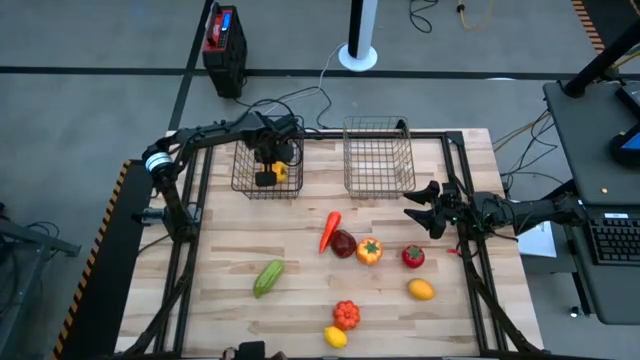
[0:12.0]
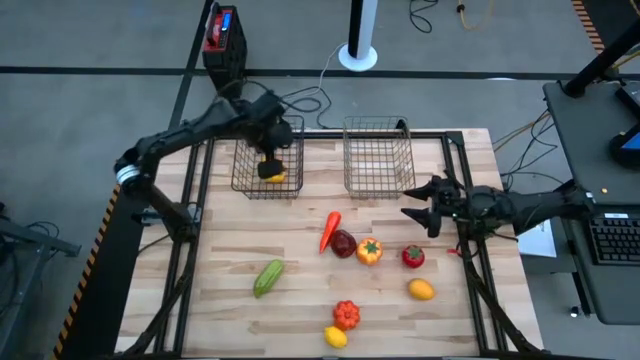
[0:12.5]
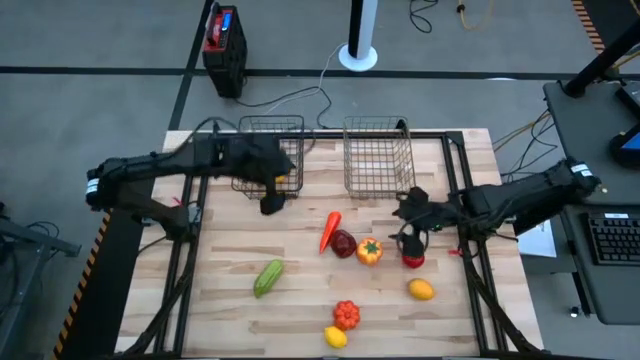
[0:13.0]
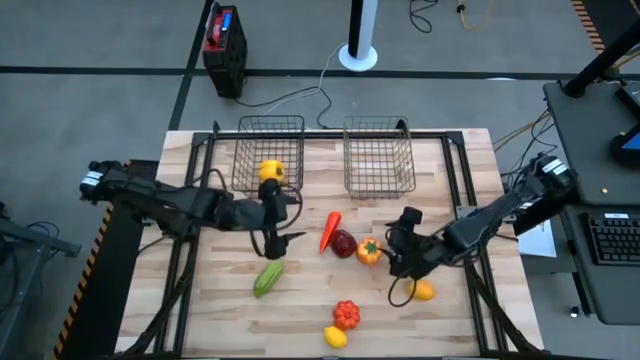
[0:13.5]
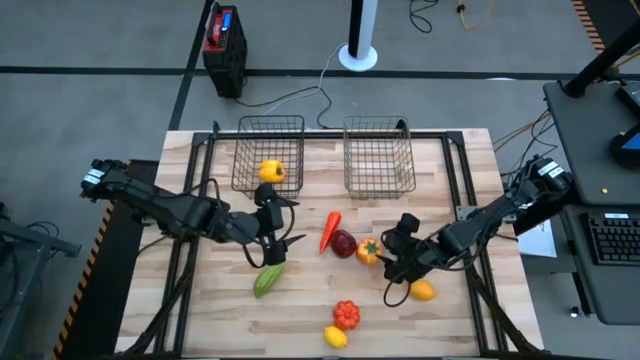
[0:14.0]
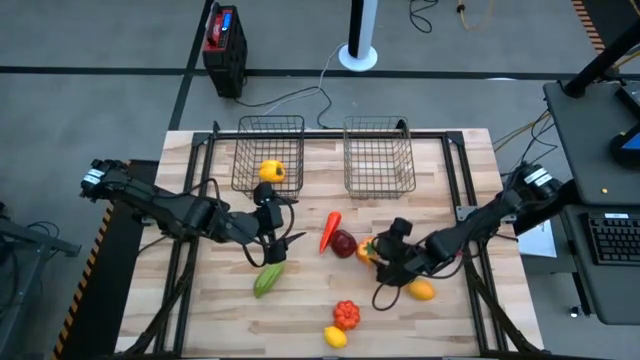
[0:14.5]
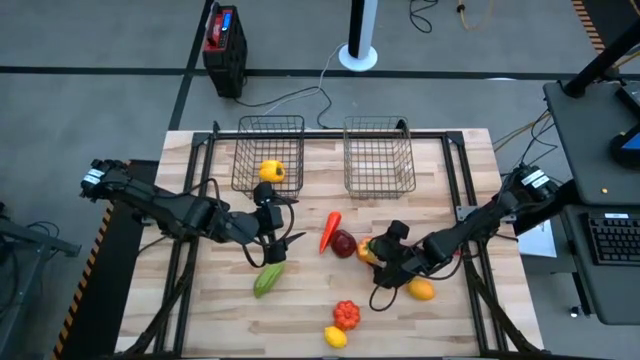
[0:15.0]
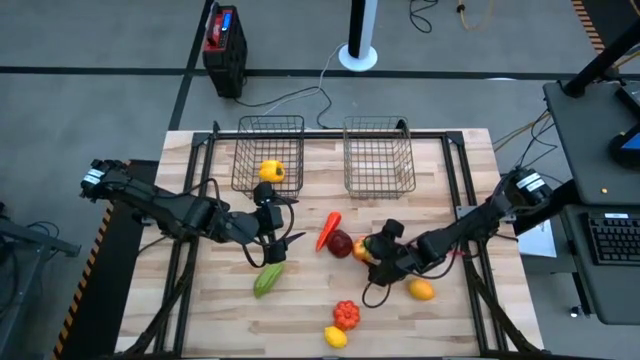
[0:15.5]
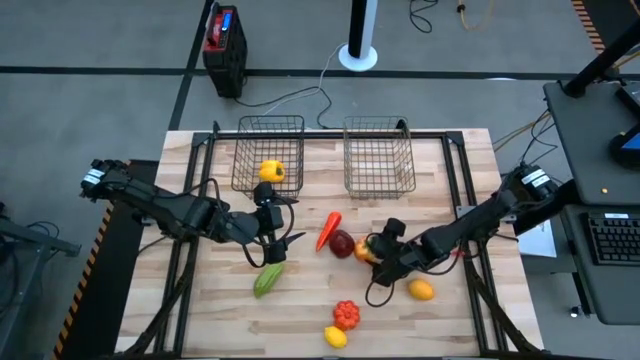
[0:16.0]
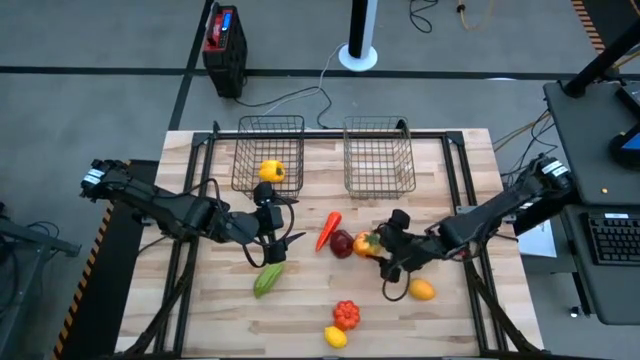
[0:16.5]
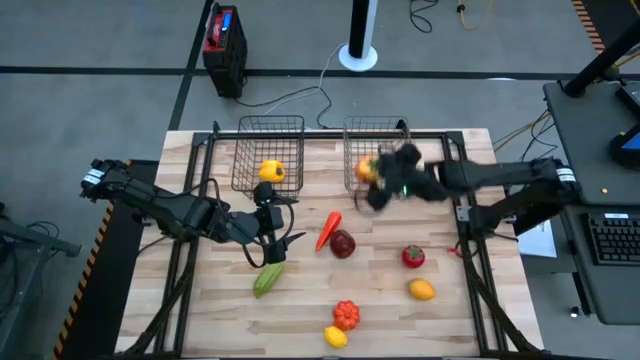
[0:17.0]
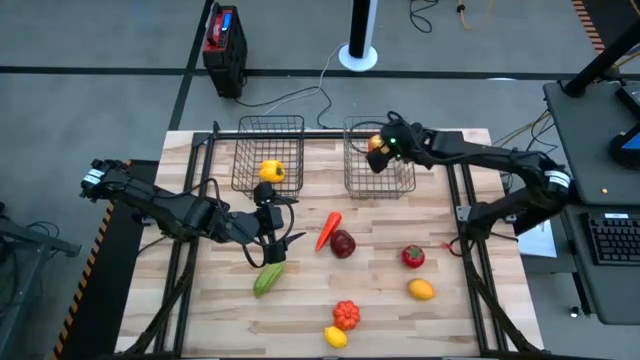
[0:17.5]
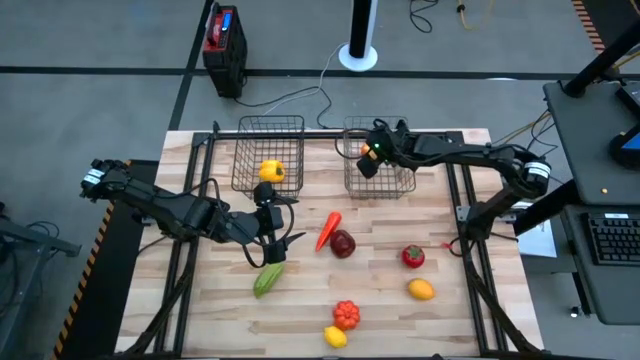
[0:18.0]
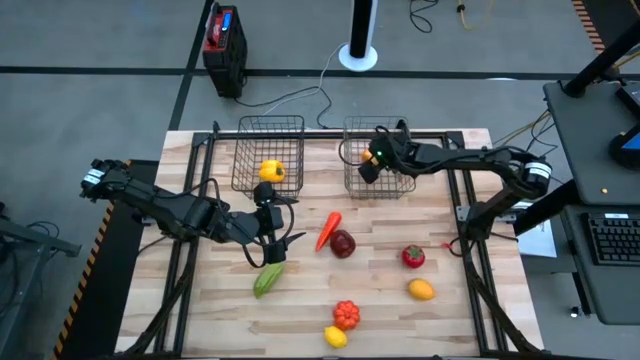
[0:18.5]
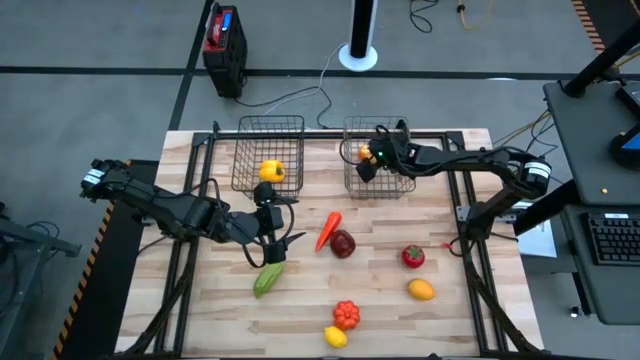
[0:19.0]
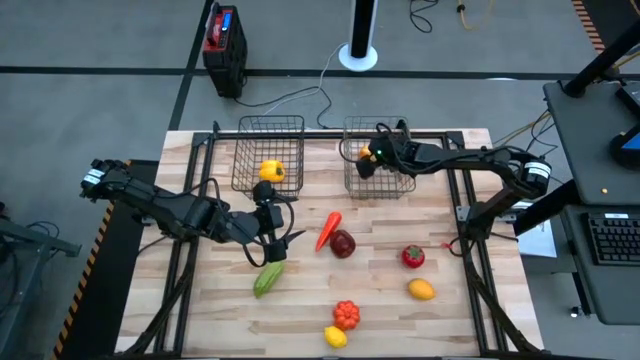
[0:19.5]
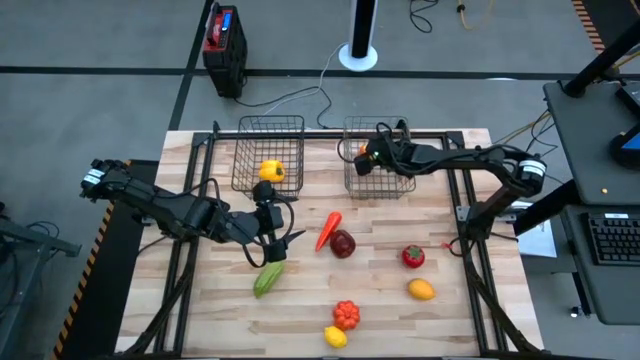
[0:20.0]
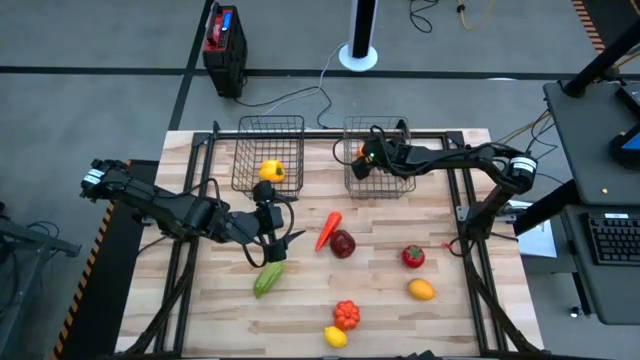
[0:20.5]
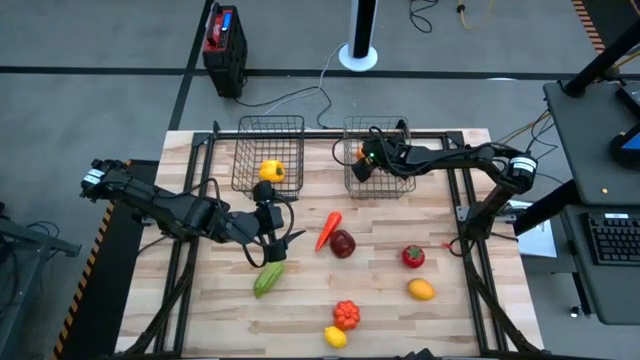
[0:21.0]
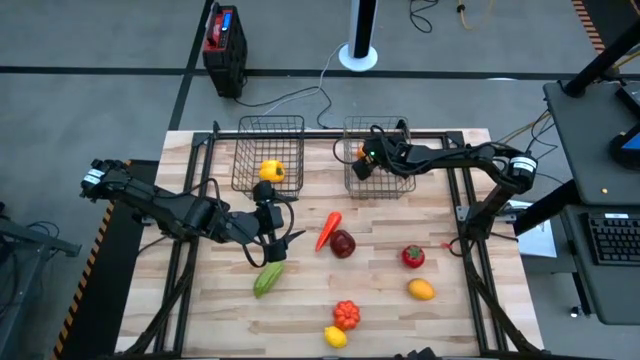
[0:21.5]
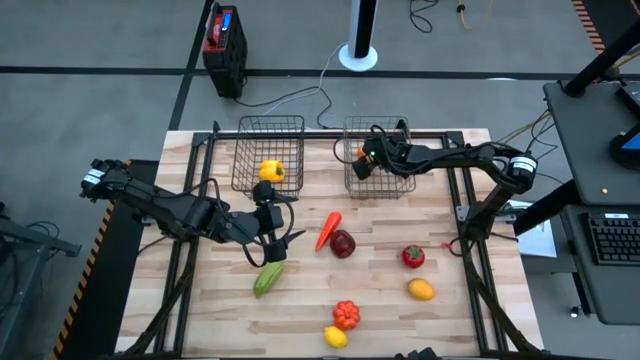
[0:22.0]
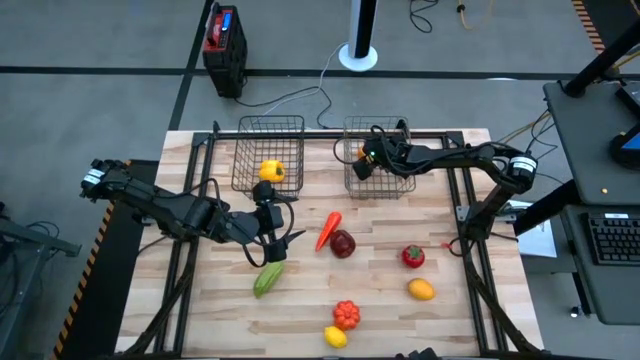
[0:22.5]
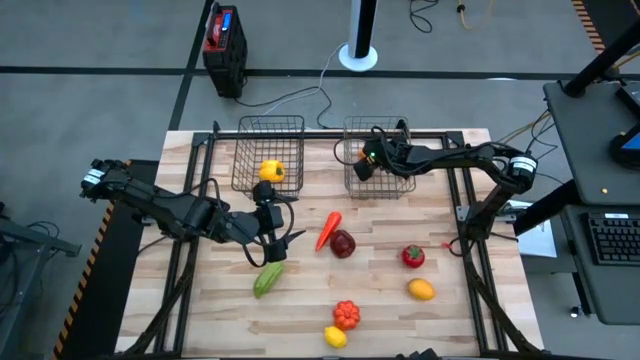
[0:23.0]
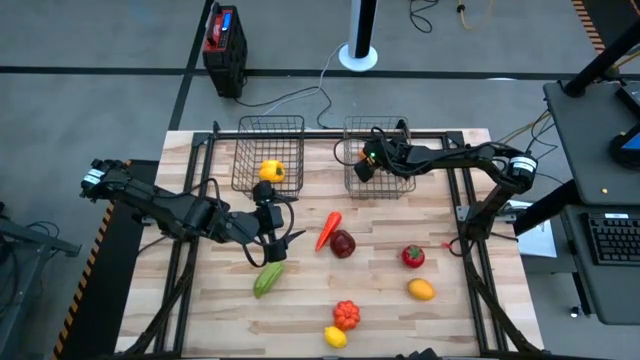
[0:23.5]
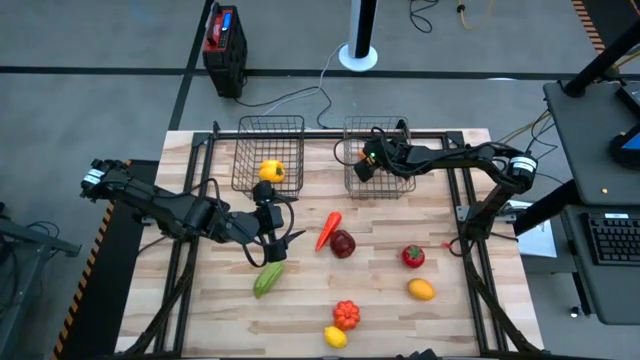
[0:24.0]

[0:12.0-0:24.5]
Task: Sort produce into baskets
Put the orange tomato into the gold wire basket

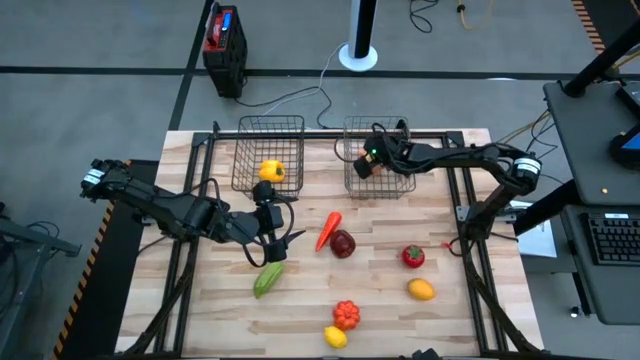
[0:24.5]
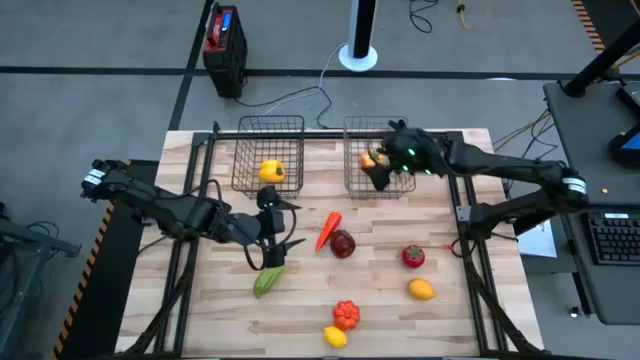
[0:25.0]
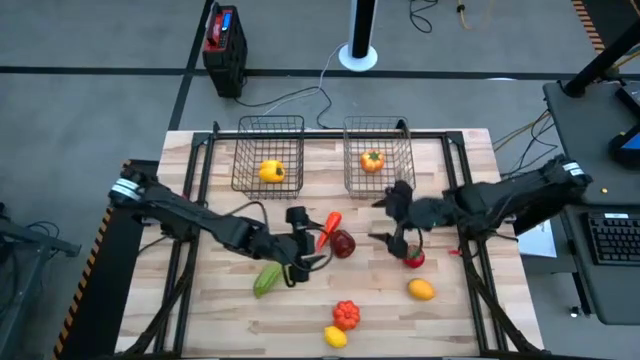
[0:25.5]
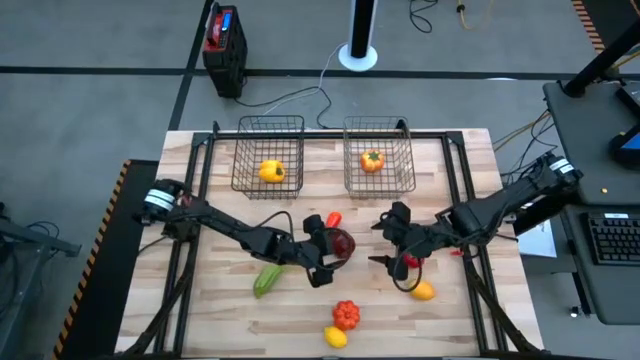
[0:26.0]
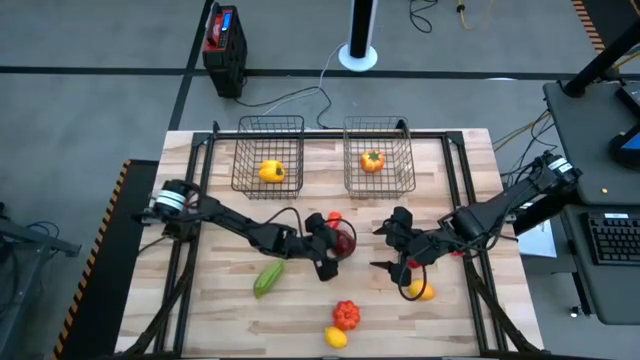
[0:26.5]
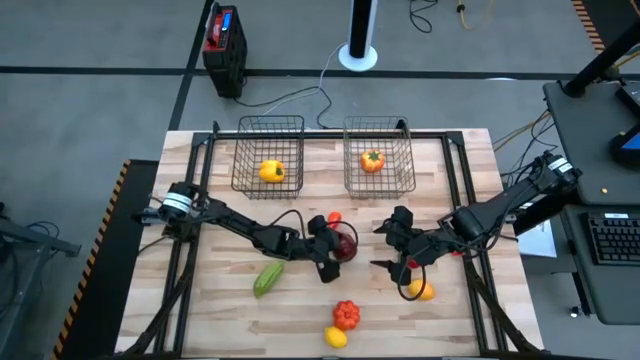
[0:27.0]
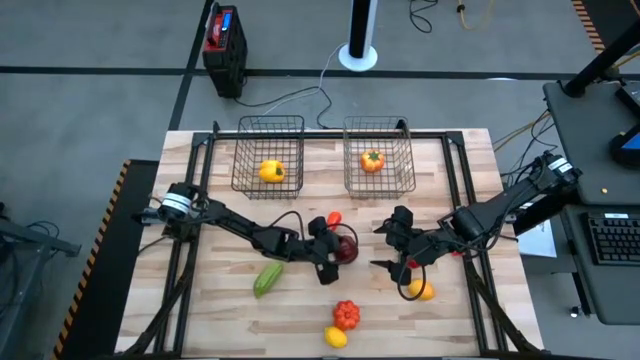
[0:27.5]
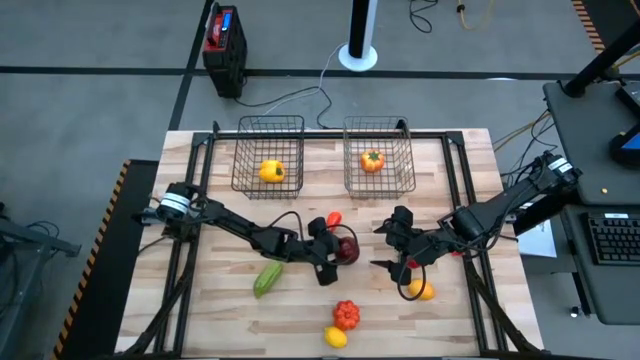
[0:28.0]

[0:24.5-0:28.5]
Put the red apple into the gold wire basket

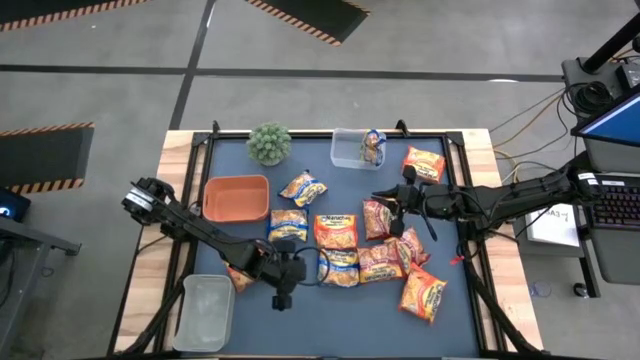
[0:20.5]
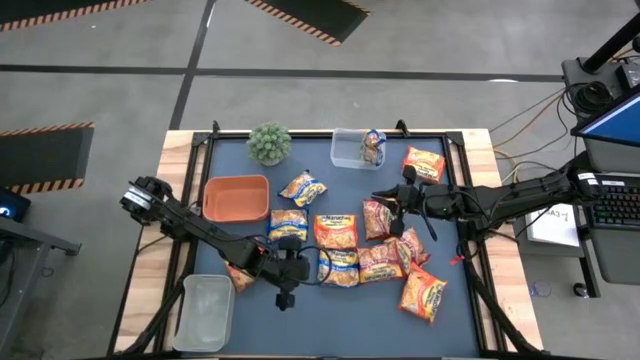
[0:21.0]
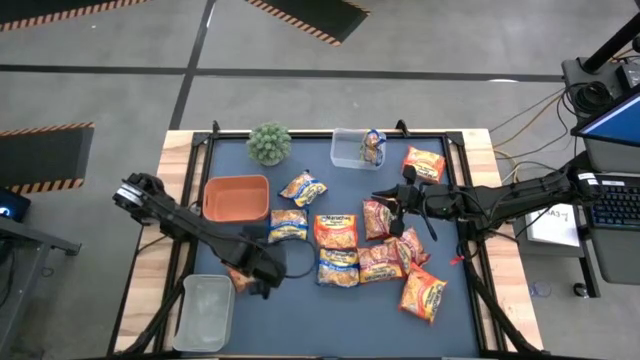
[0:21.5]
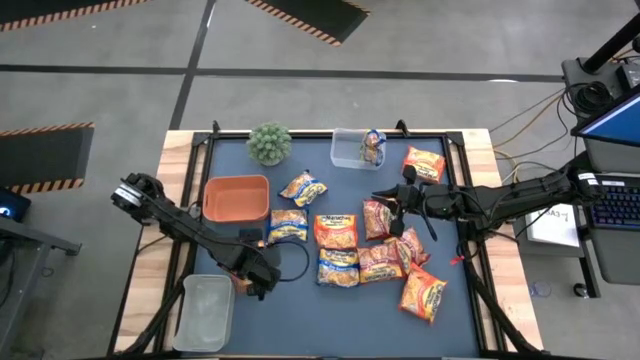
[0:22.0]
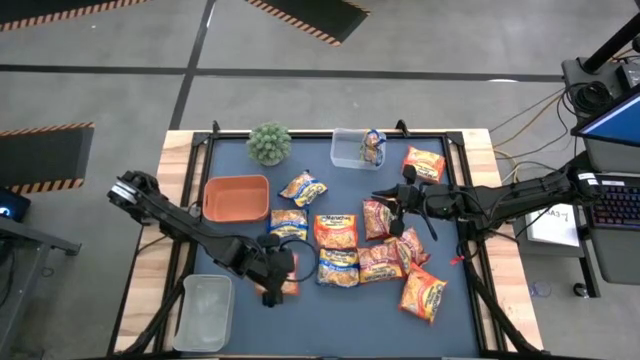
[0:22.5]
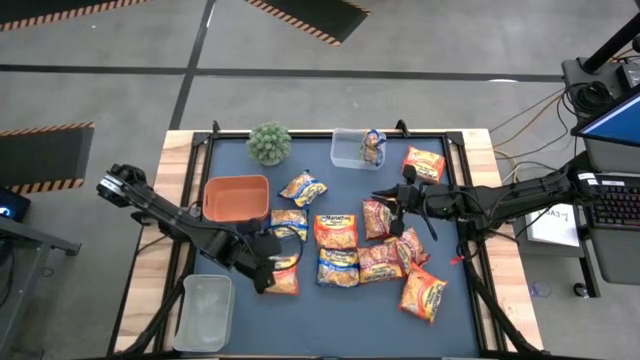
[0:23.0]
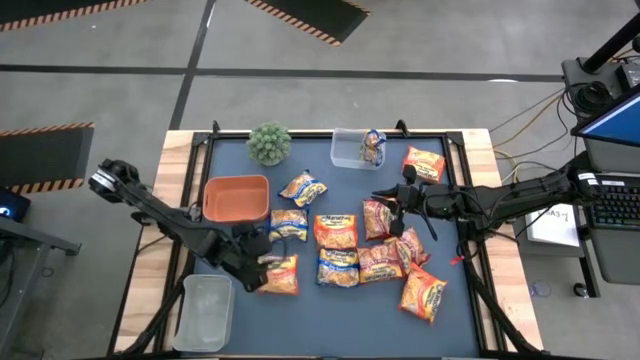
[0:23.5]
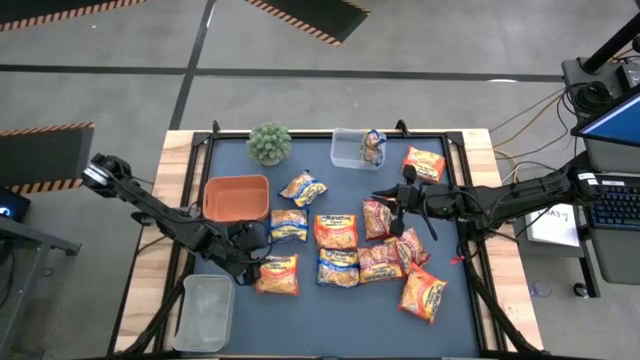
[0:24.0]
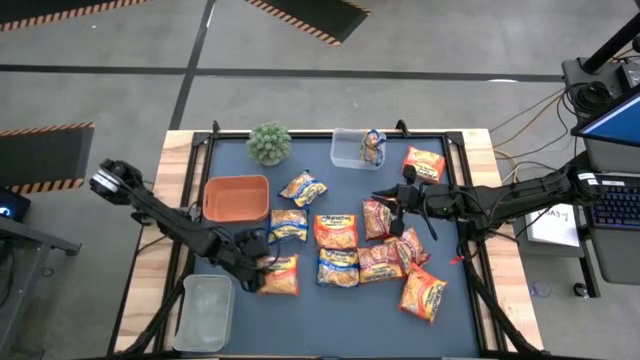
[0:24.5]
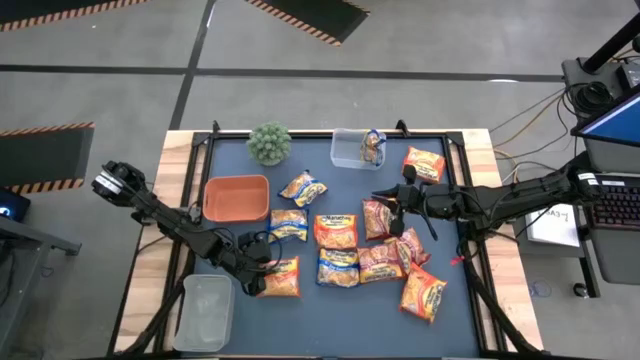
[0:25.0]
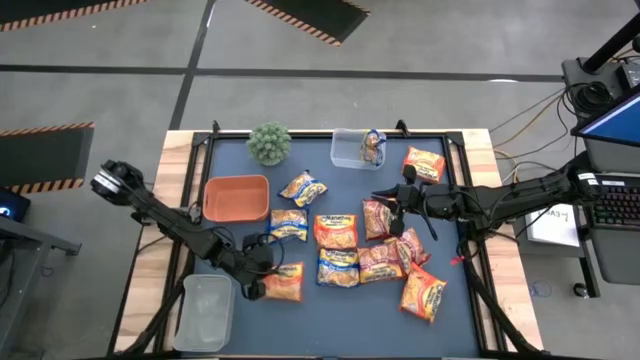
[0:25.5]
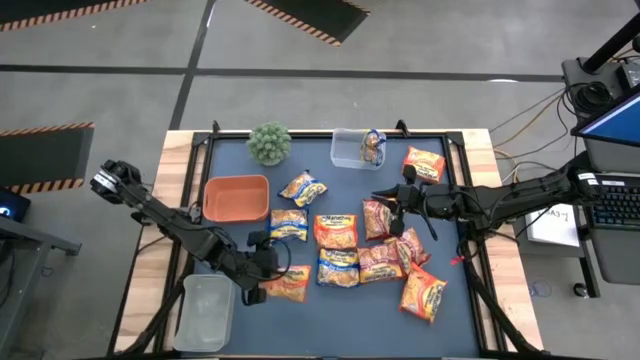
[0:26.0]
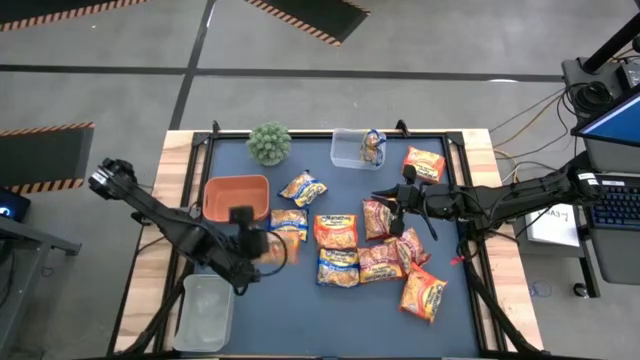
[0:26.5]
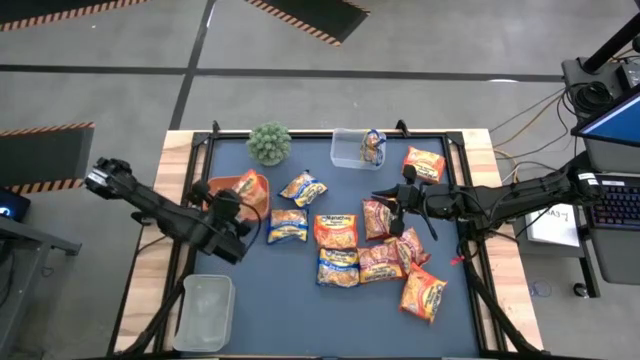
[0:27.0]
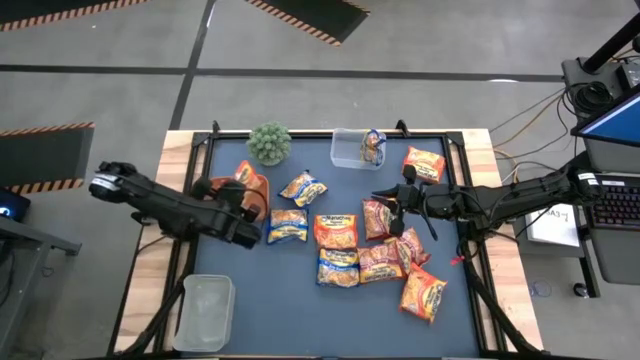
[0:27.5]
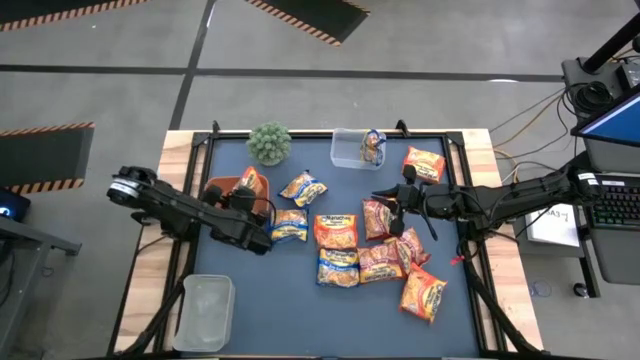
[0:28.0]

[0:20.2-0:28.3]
Task: Sort Maruchan noodles
Put the orange noodle pack into the orange bin
